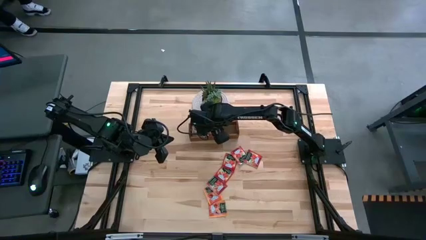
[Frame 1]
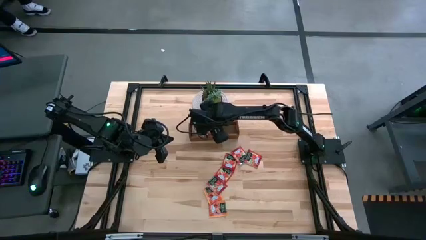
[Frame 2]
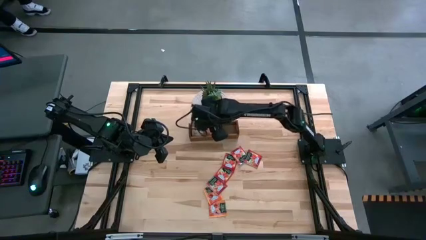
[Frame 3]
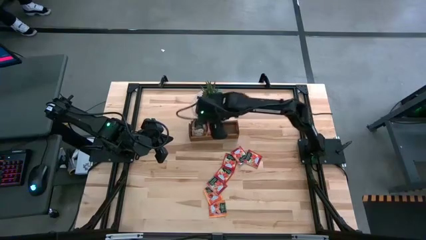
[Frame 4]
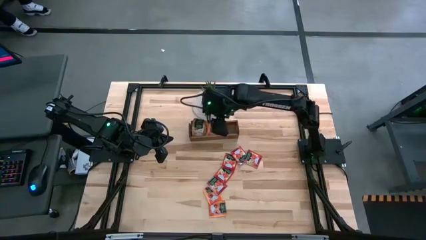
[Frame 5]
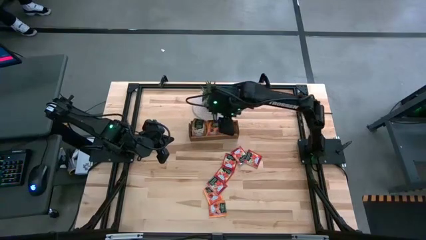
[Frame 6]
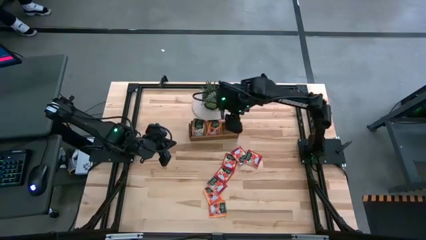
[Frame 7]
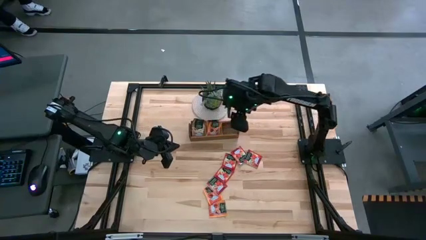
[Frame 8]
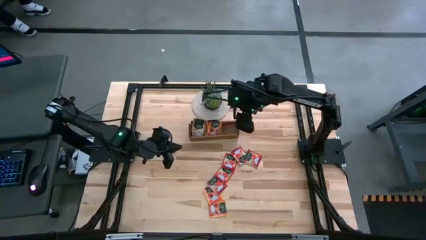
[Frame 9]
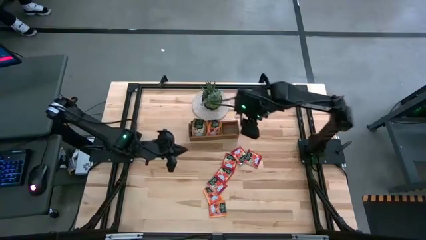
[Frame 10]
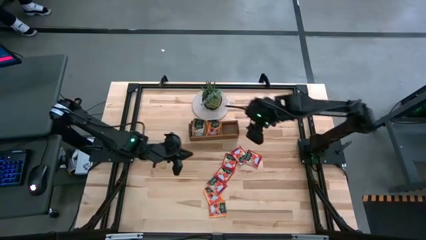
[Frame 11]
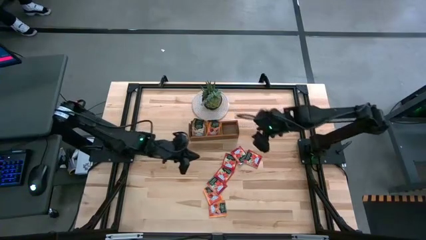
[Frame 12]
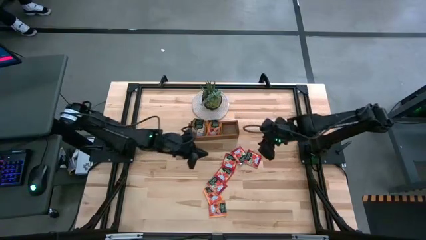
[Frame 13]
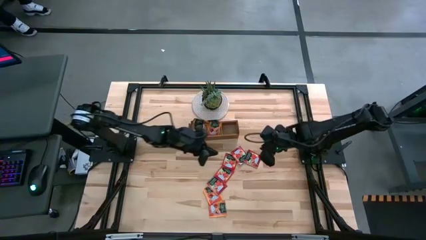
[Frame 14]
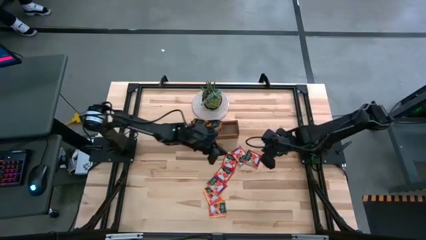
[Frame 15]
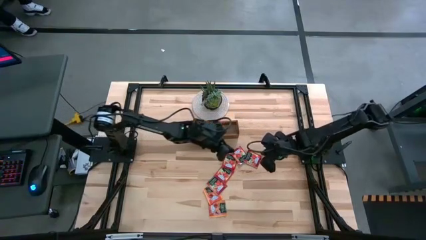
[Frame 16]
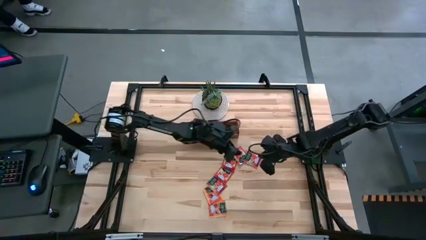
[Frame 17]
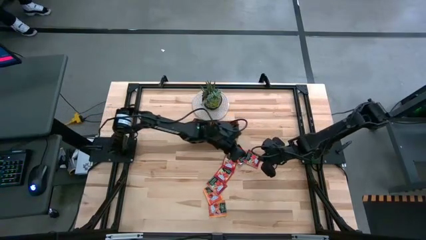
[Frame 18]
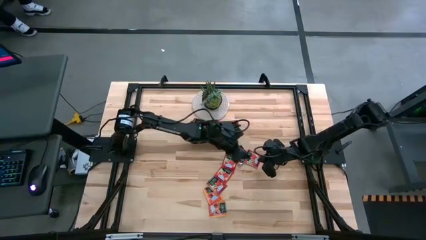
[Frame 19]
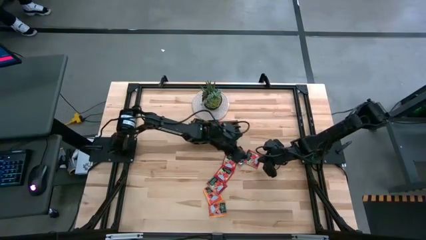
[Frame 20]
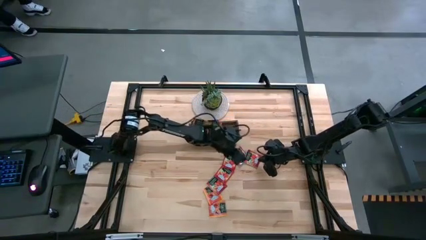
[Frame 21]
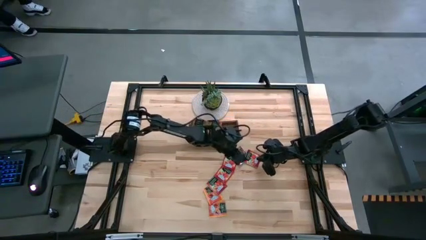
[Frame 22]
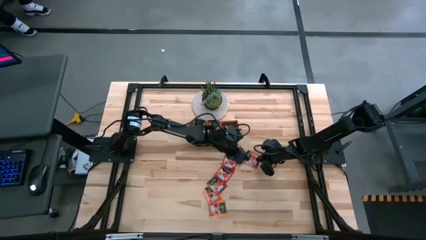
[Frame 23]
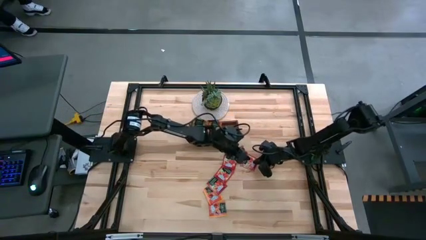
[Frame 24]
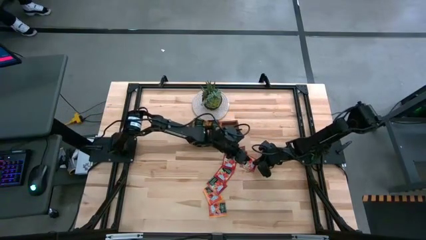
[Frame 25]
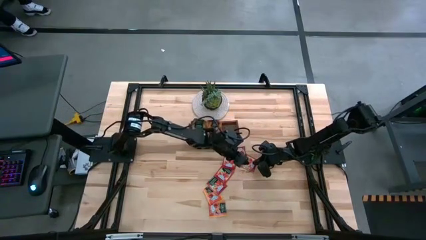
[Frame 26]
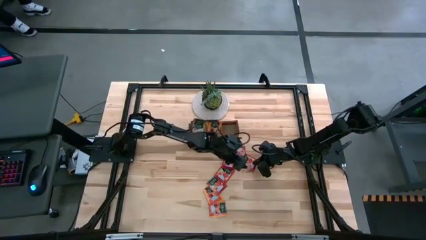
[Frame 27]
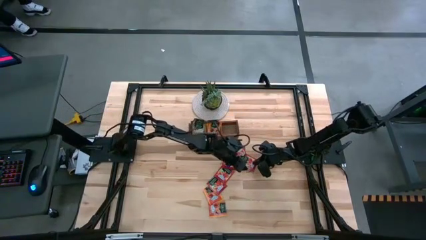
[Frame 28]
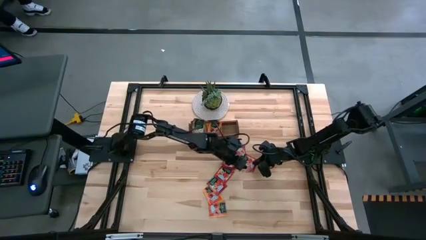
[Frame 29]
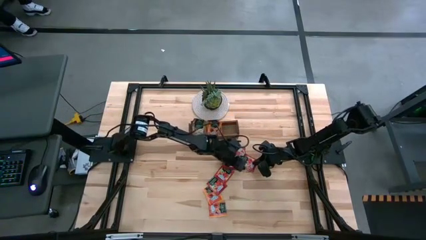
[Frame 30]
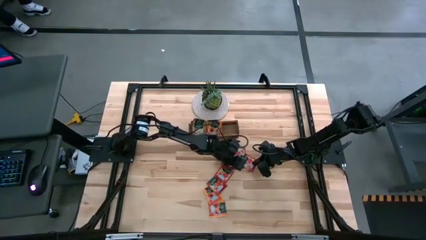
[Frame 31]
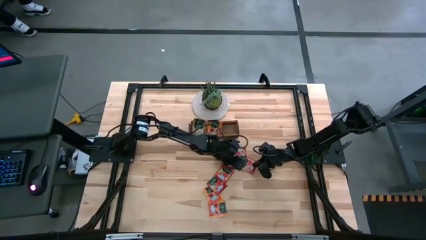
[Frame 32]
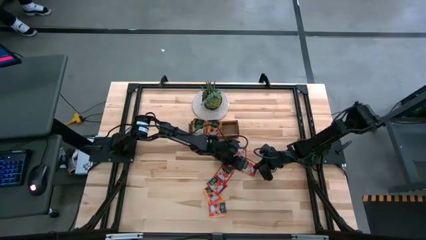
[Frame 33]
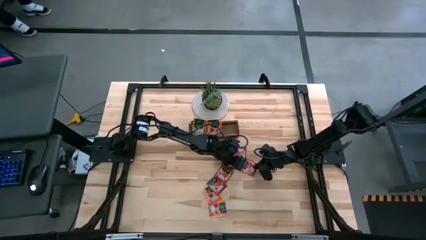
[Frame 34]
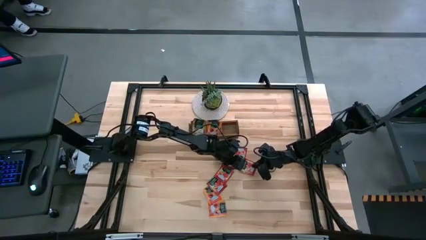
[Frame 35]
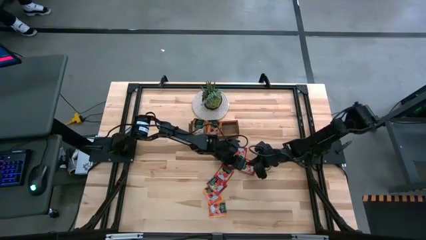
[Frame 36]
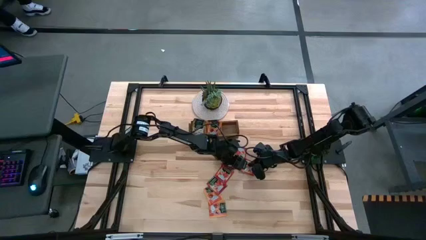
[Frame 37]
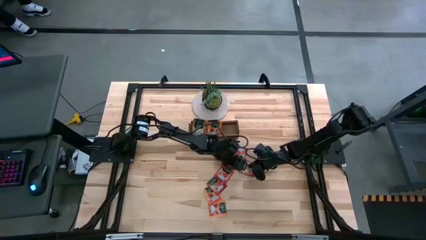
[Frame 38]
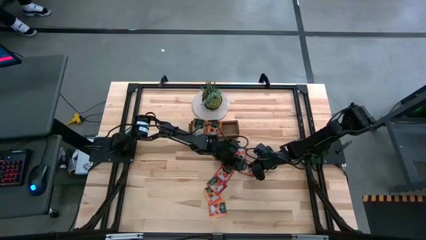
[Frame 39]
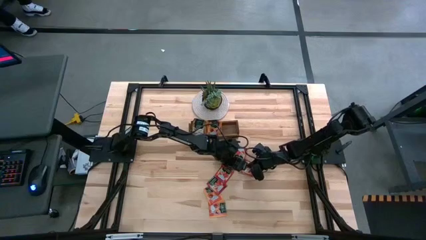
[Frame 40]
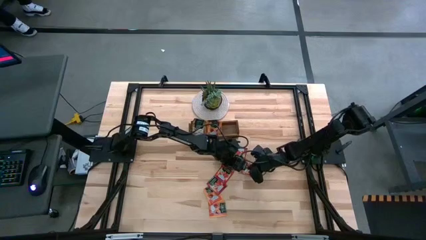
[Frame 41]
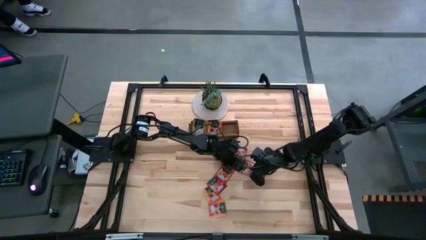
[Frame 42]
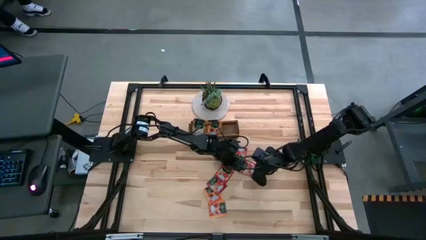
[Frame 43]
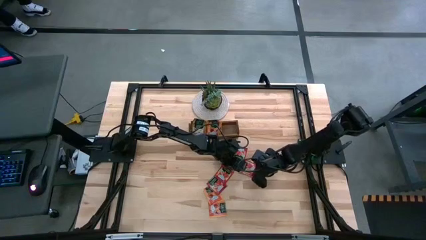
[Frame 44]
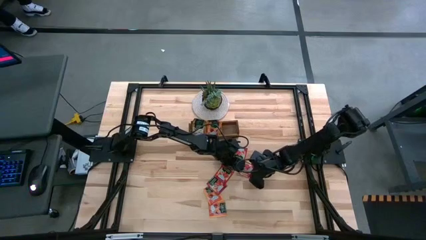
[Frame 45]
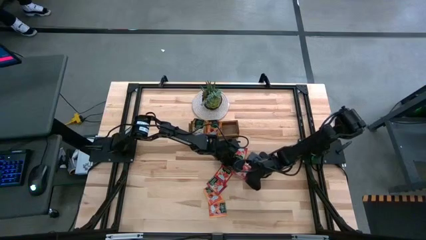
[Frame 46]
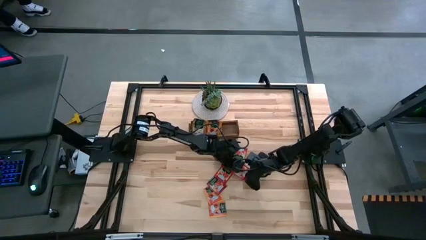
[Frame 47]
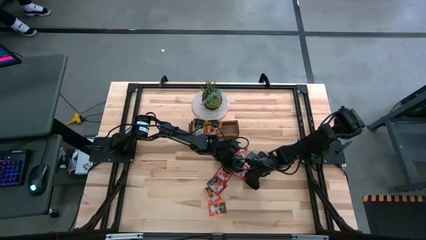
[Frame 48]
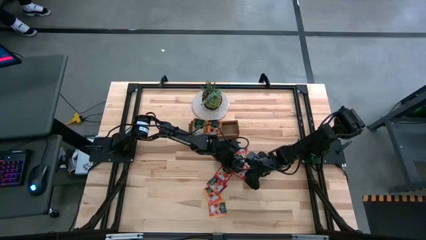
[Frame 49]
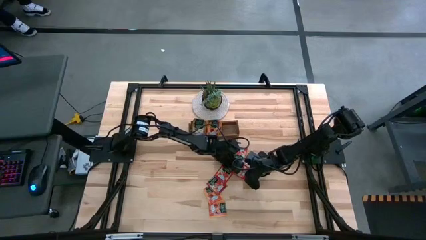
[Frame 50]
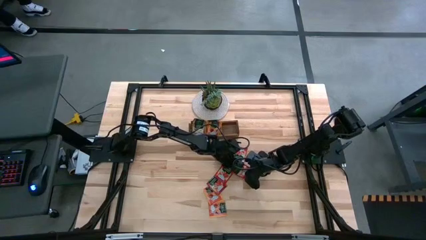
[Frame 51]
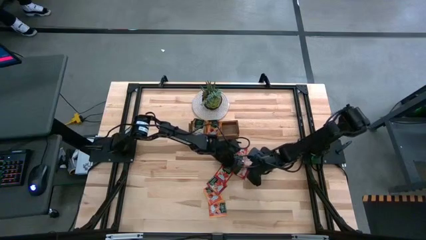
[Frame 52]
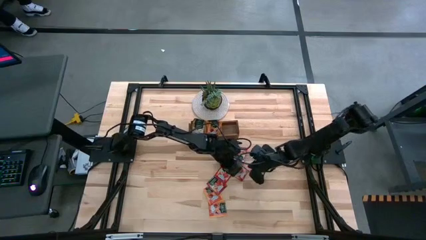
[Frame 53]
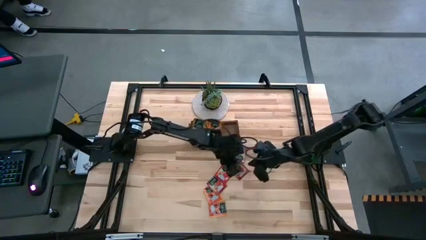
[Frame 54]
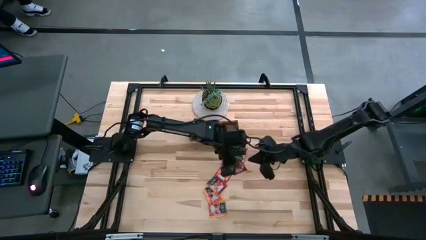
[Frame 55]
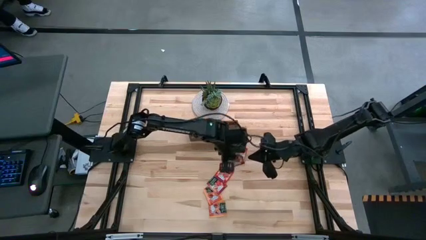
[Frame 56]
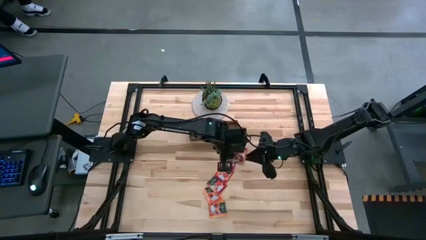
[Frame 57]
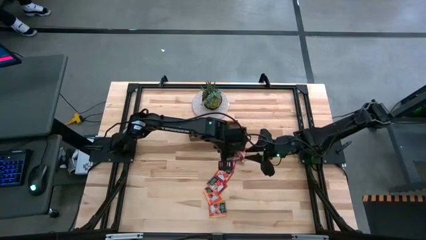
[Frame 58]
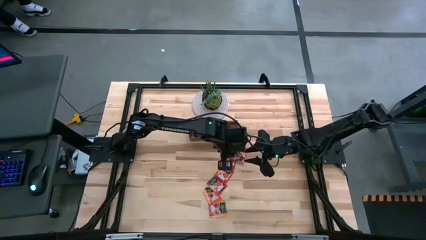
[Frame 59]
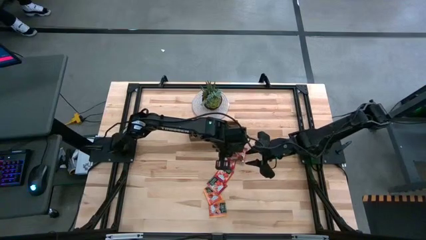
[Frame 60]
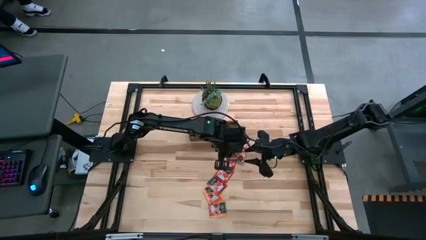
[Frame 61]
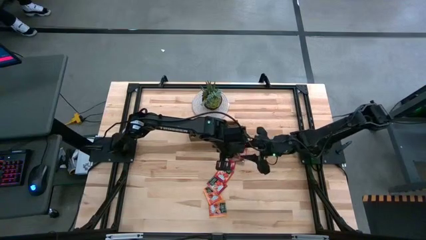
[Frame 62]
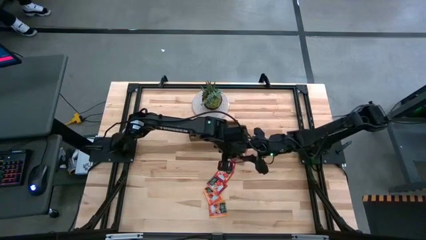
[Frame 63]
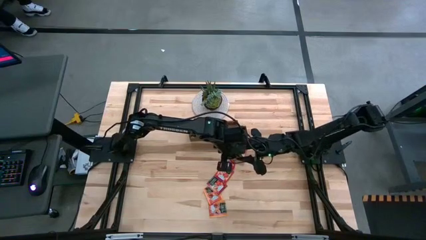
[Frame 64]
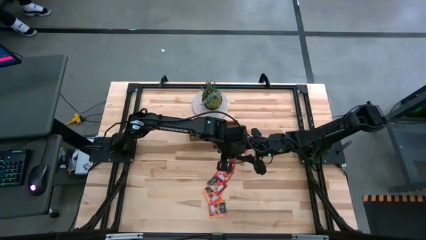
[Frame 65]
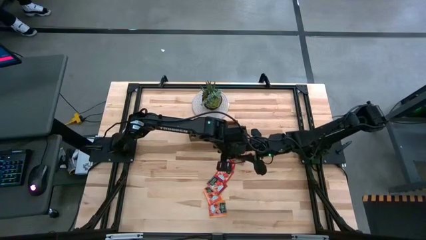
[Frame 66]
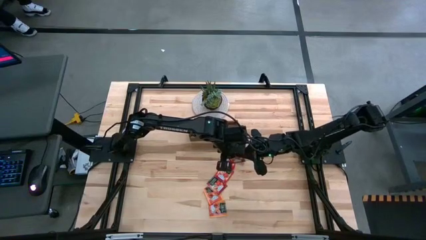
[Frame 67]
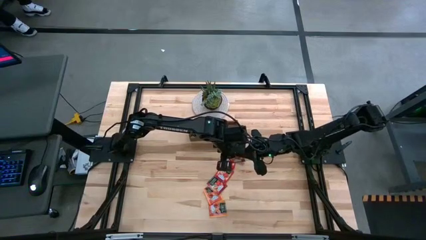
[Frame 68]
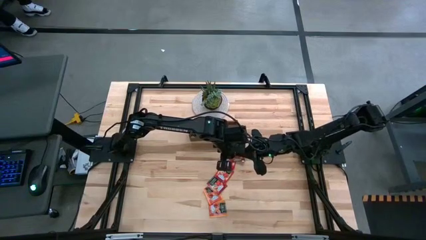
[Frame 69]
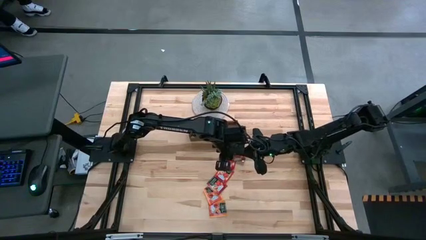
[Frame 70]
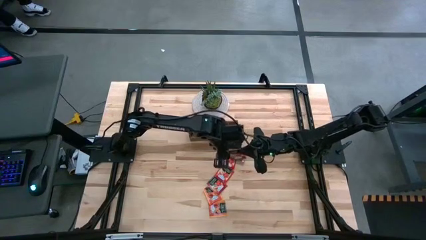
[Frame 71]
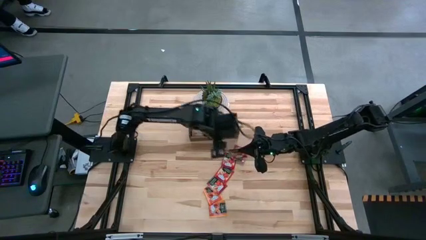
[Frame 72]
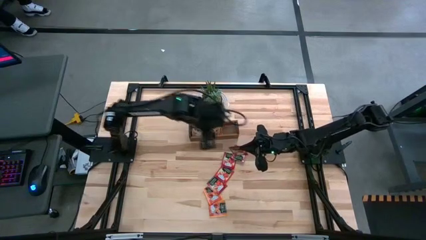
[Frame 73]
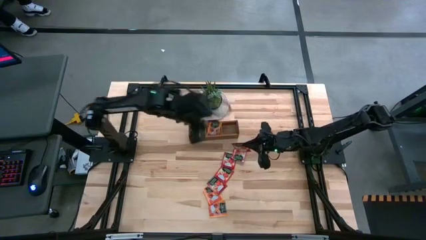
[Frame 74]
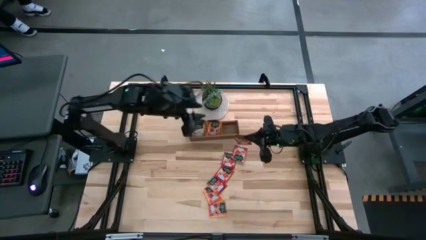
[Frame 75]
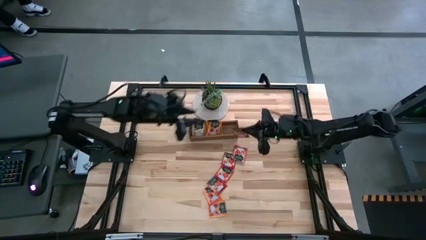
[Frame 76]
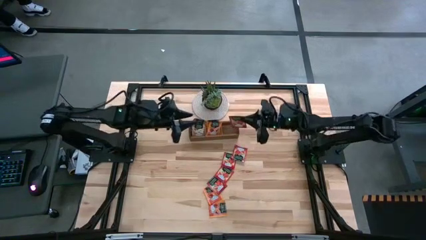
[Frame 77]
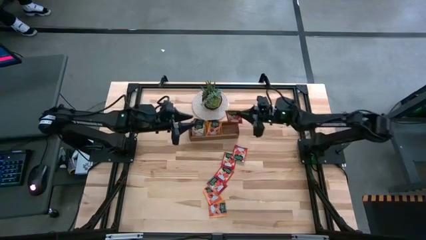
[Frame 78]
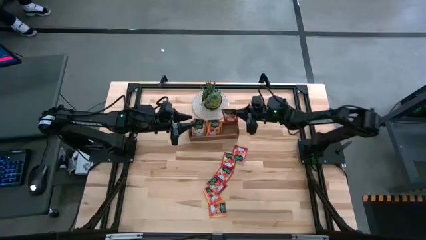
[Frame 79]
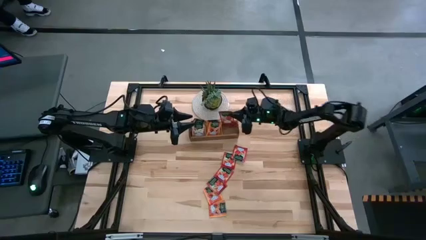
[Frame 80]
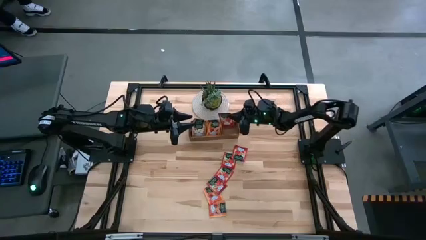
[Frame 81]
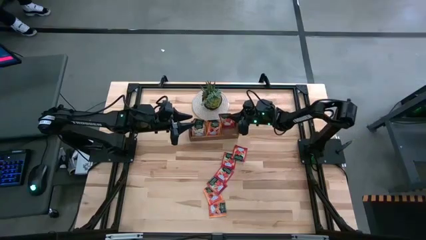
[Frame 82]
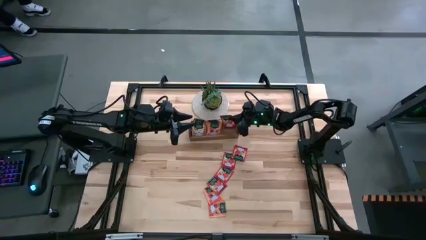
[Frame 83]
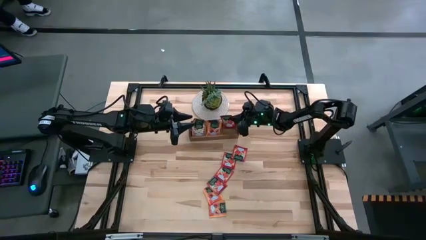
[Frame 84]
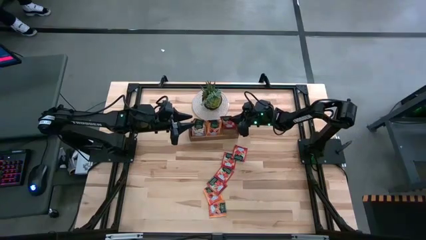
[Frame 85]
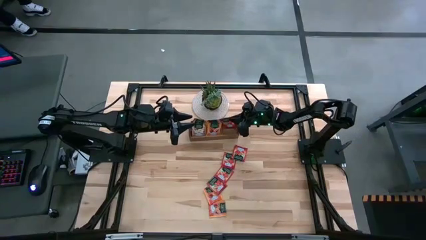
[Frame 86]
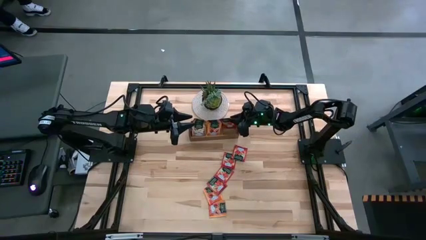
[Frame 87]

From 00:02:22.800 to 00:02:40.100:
Task: Pick & Place Tea
Put the red tea bag into the right section of the wooden organizer
